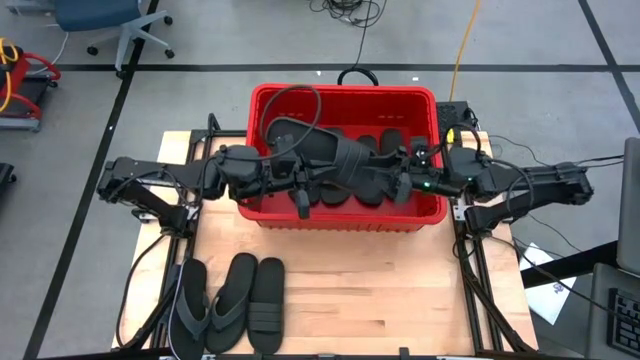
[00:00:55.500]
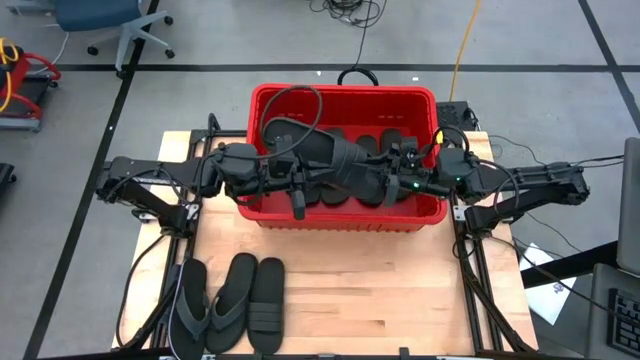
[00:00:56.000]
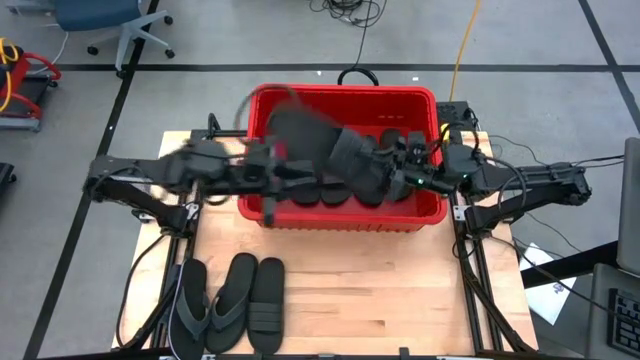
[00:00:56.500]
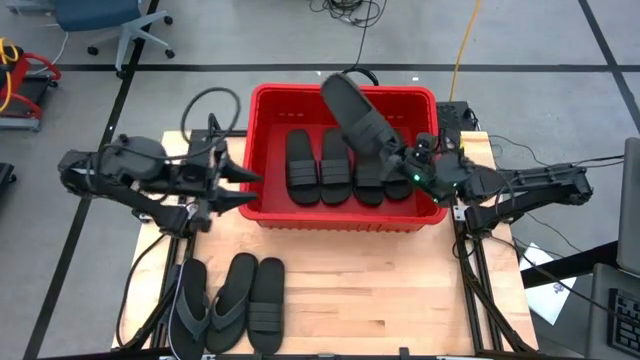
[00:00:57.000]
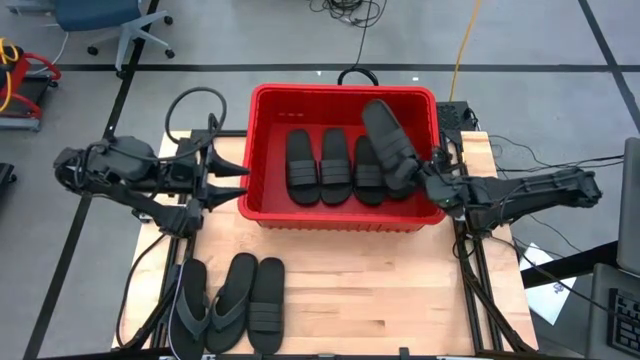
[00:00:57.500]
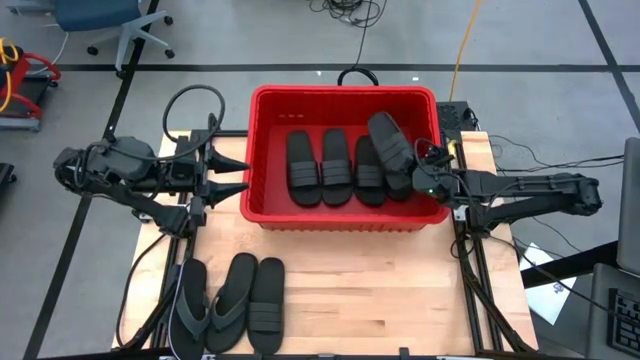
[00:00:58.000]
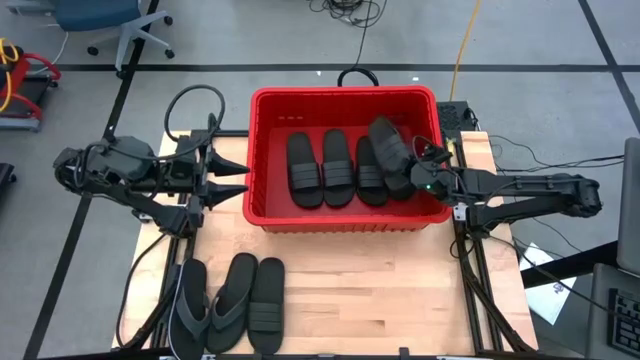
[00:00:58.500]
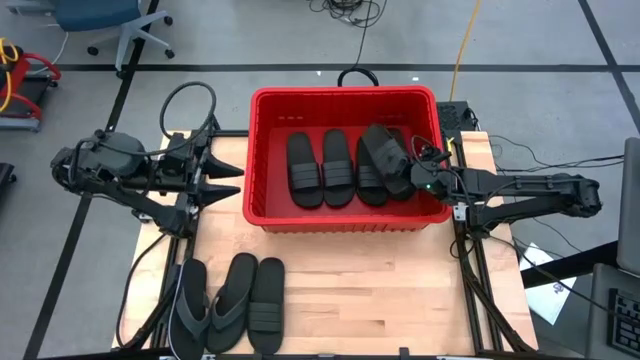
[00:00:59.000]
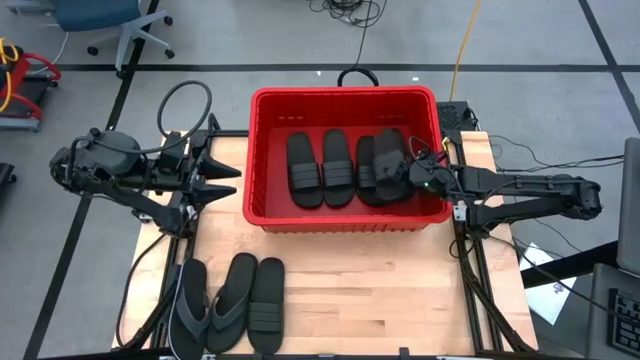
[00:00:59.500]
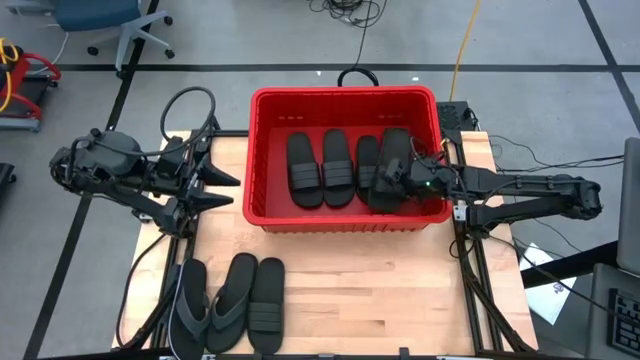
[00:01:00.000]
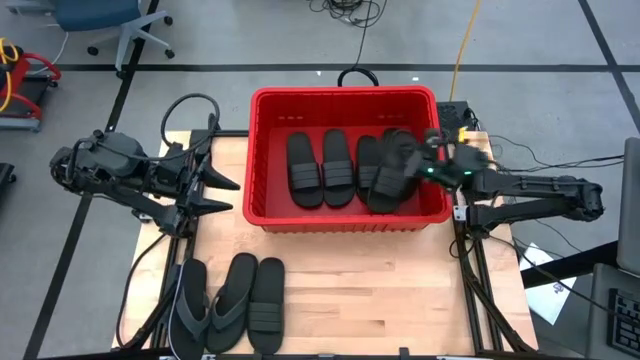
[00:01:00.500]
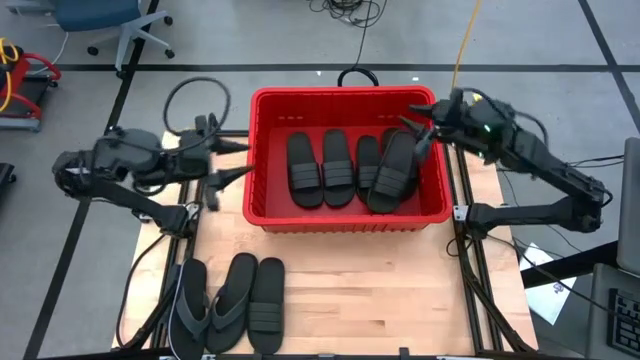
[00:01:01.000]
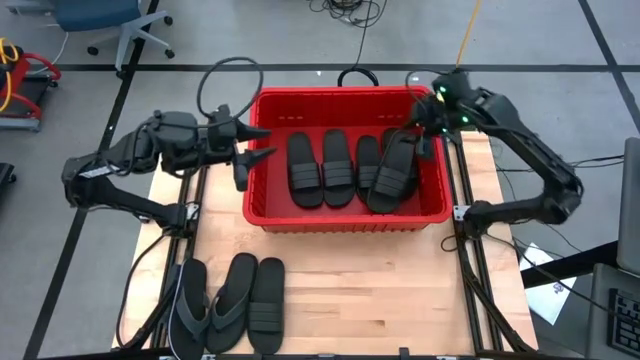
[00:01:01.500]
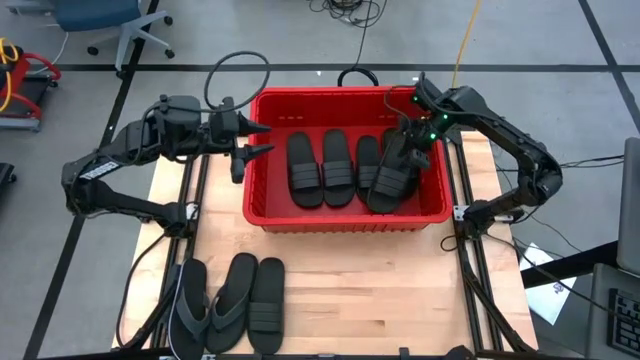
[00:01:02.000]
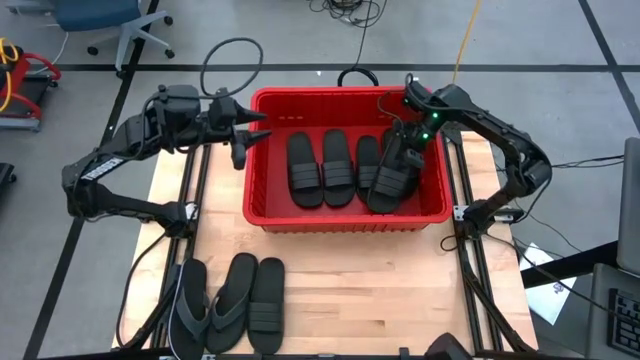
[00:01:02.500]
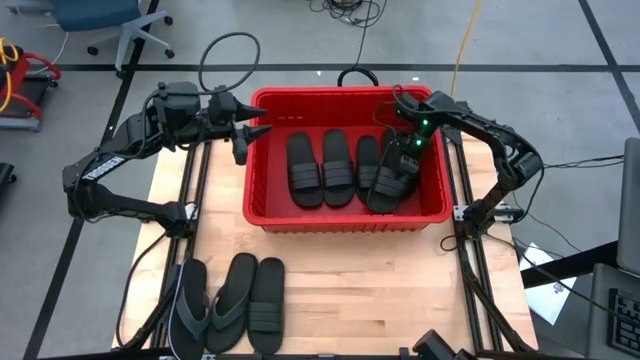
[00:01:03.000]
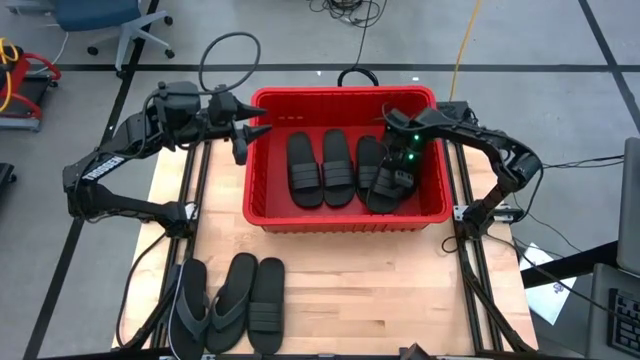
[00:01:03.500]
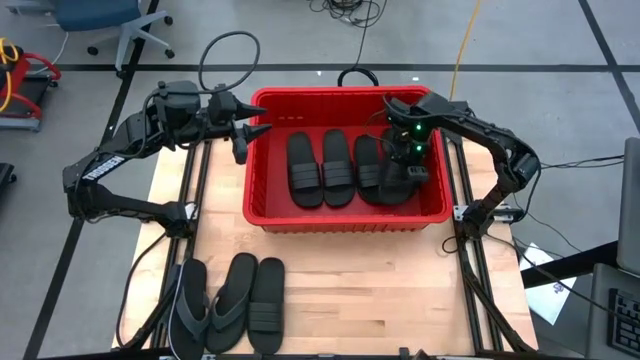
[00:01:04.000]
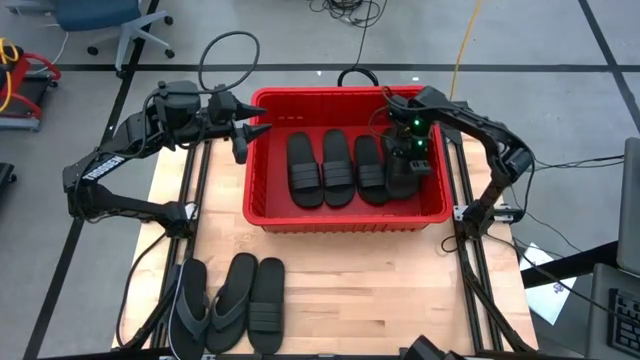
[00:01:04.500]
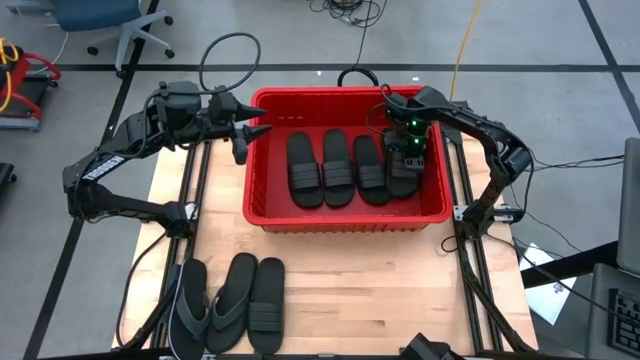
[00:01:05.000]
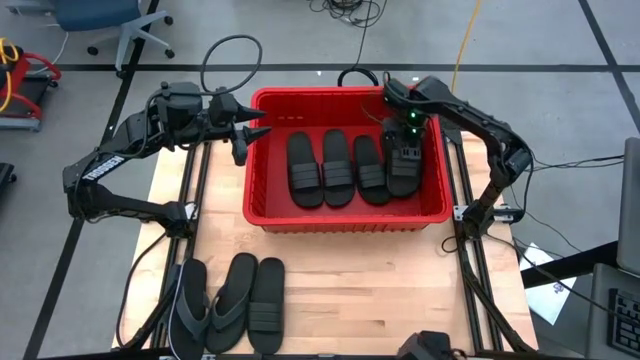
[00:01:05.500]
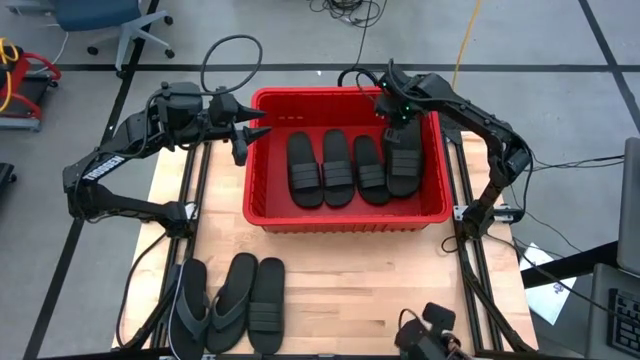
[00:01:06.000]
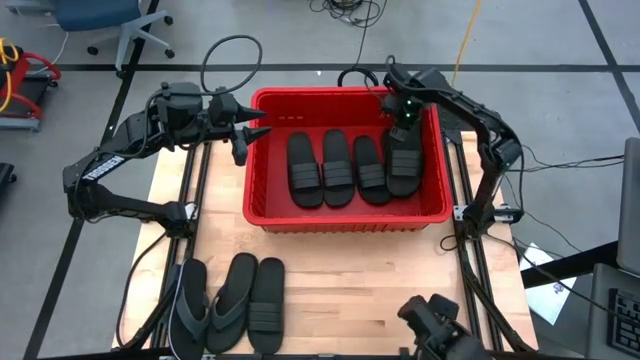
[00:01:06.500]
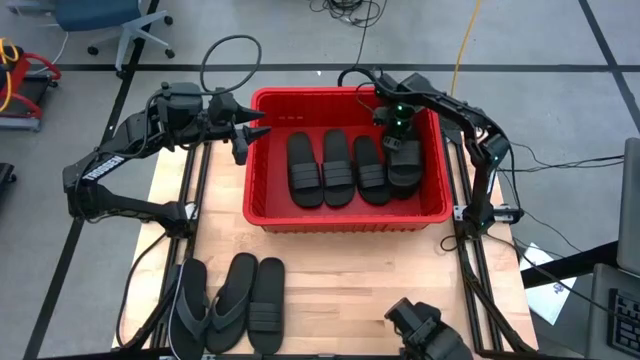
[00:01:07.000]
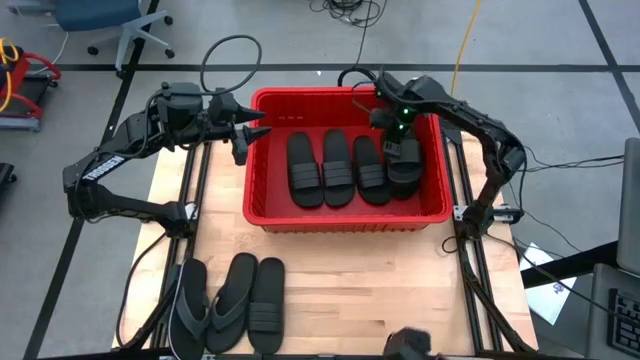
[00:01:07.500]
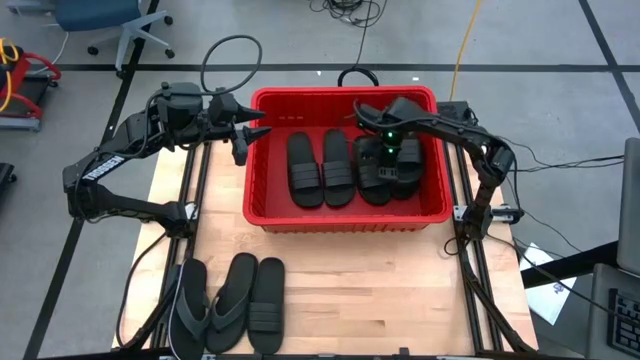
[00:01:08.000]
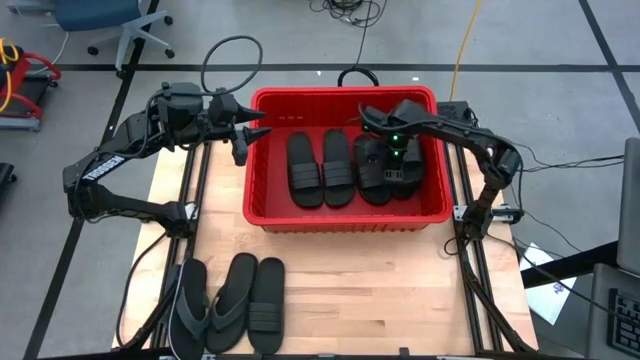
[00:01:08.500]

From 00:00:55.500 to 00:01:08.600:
Task: Pick and place slides into bin
Put the black slide into the red bin
